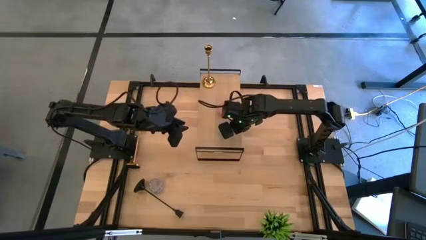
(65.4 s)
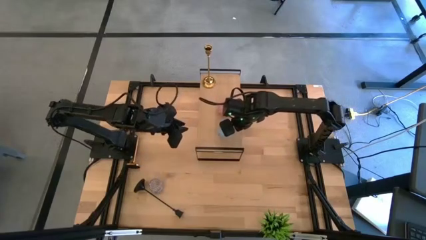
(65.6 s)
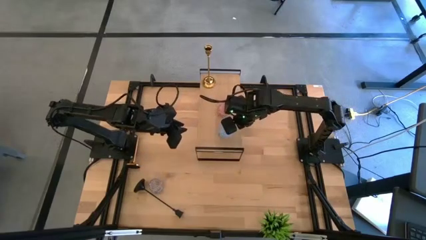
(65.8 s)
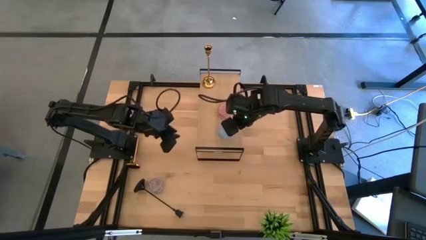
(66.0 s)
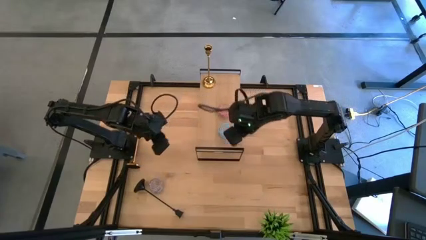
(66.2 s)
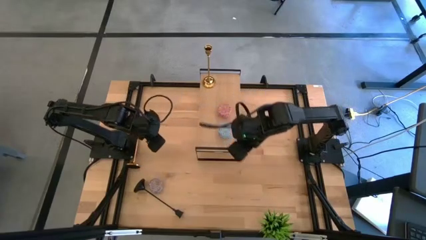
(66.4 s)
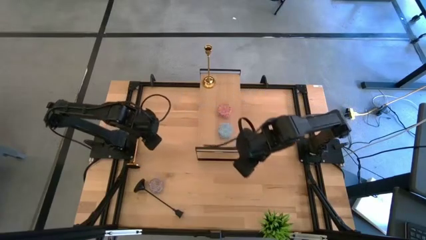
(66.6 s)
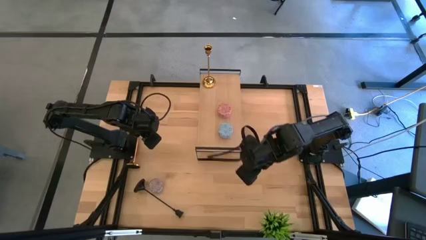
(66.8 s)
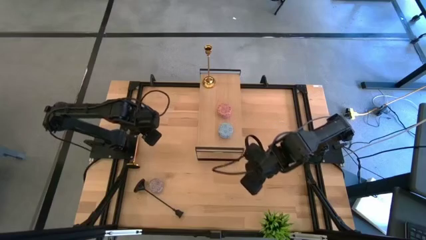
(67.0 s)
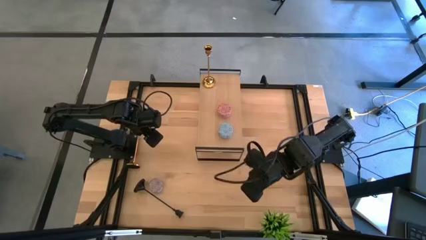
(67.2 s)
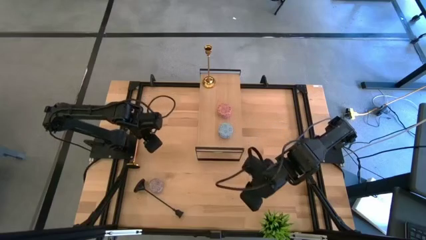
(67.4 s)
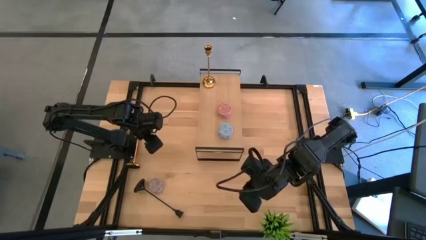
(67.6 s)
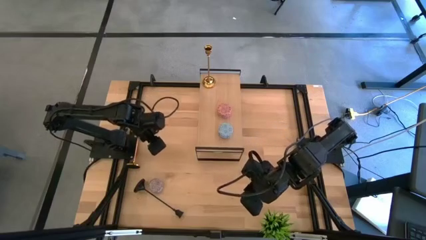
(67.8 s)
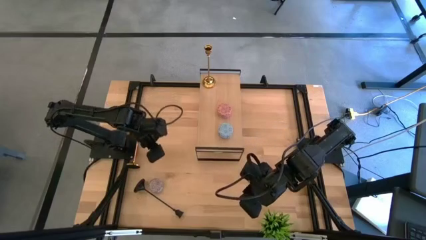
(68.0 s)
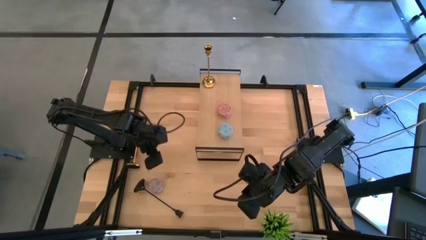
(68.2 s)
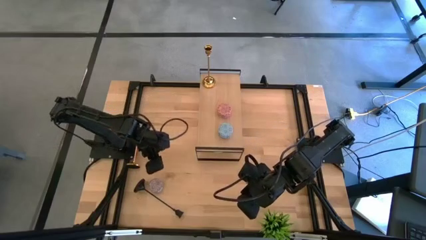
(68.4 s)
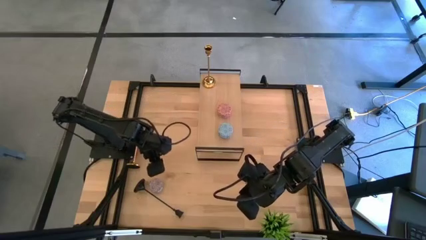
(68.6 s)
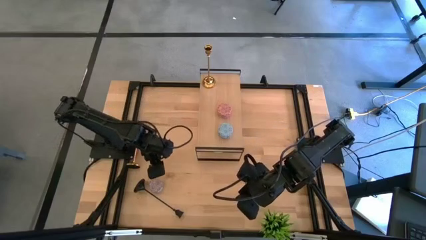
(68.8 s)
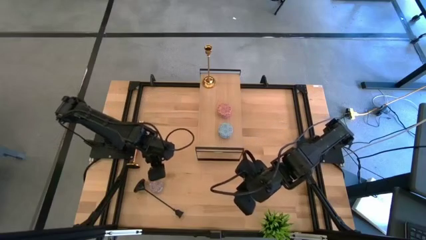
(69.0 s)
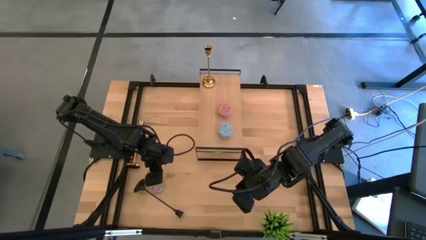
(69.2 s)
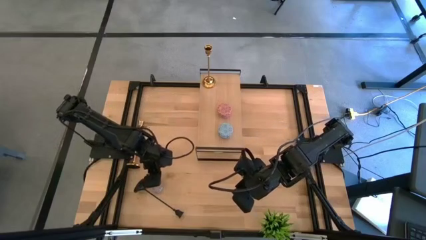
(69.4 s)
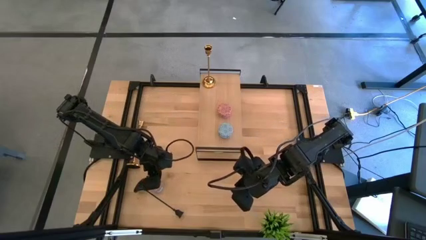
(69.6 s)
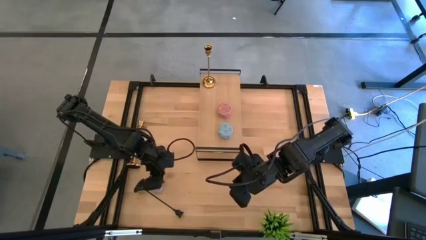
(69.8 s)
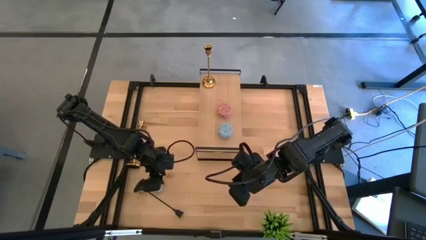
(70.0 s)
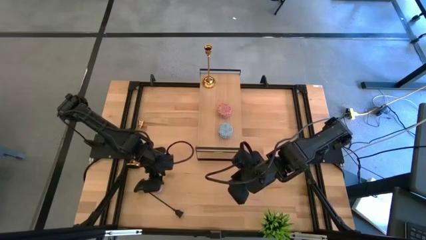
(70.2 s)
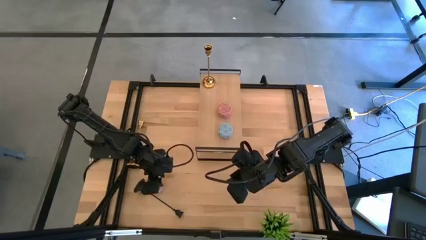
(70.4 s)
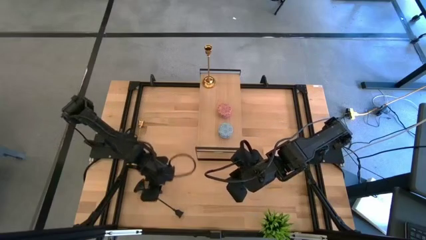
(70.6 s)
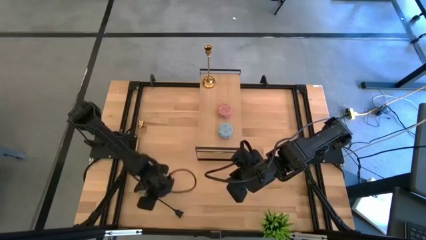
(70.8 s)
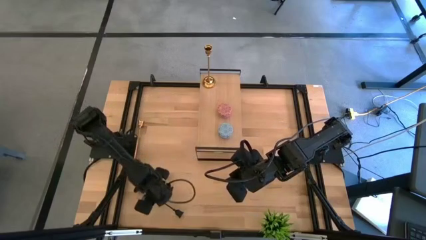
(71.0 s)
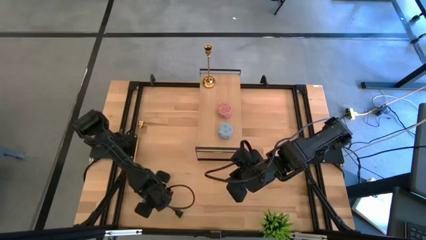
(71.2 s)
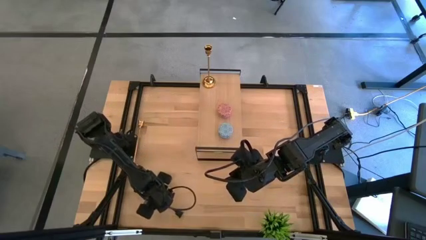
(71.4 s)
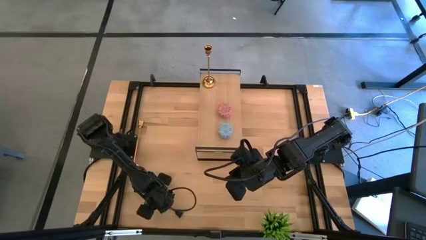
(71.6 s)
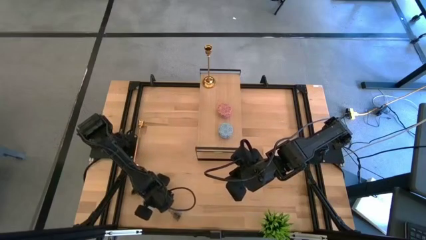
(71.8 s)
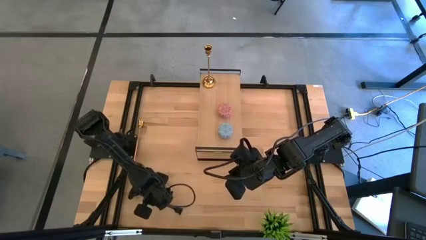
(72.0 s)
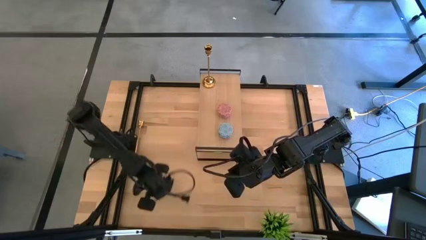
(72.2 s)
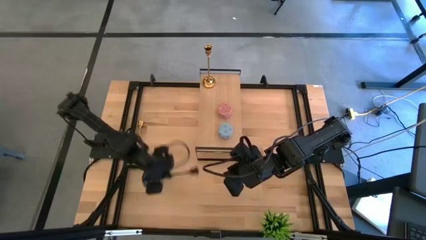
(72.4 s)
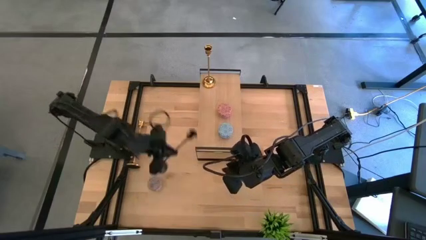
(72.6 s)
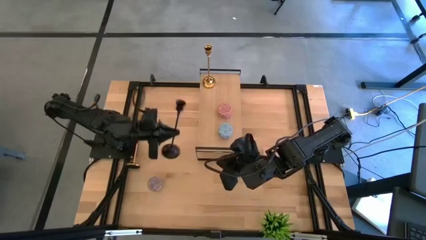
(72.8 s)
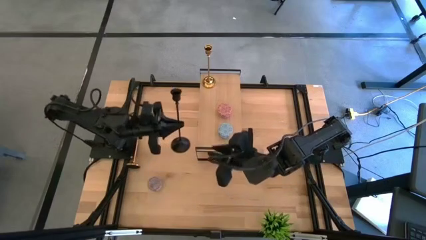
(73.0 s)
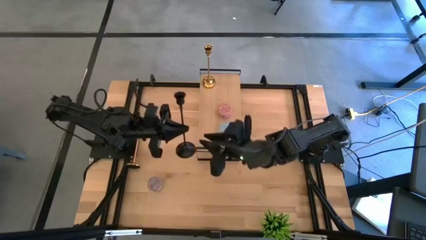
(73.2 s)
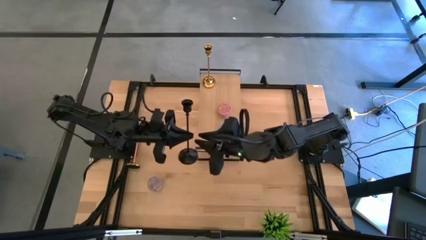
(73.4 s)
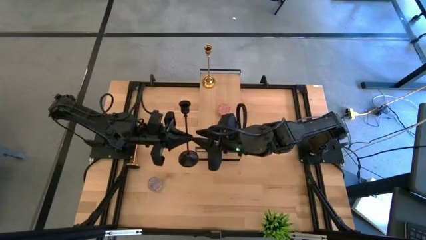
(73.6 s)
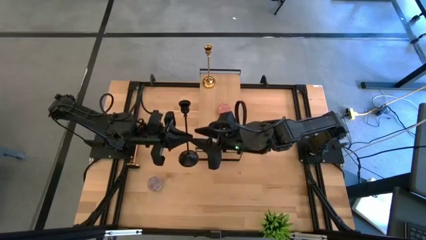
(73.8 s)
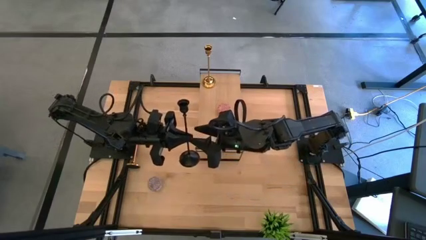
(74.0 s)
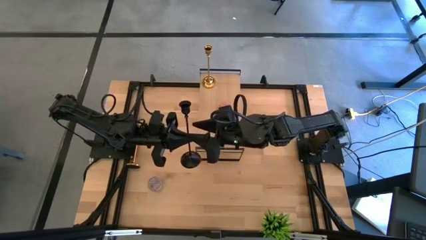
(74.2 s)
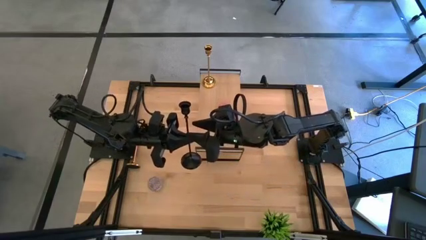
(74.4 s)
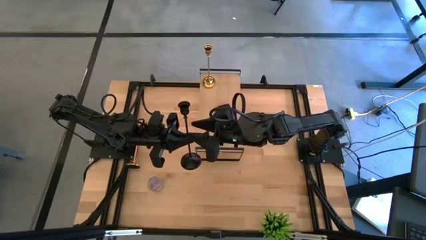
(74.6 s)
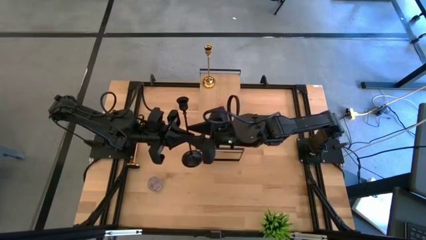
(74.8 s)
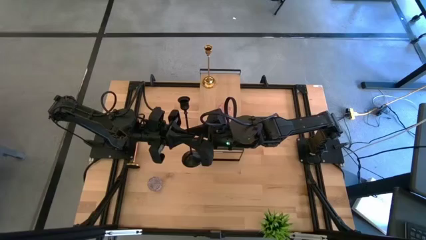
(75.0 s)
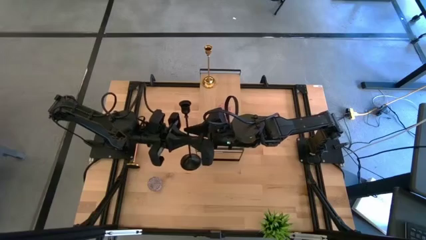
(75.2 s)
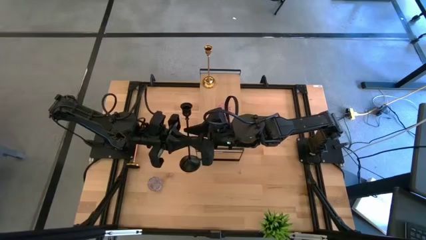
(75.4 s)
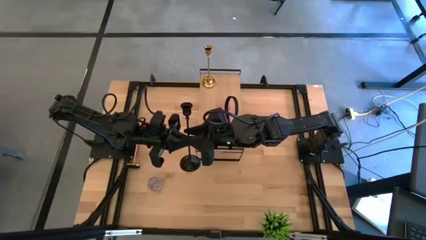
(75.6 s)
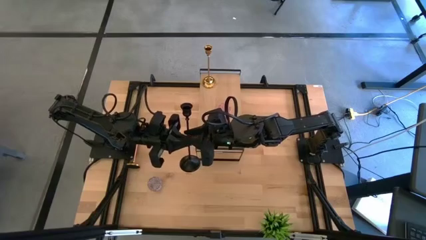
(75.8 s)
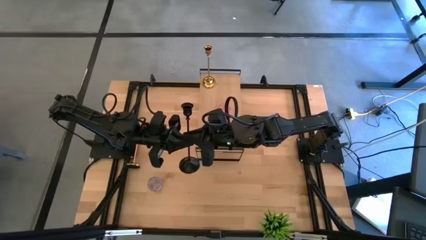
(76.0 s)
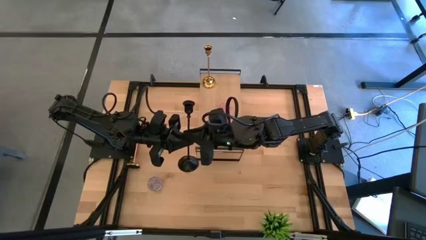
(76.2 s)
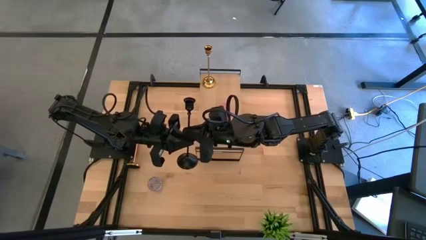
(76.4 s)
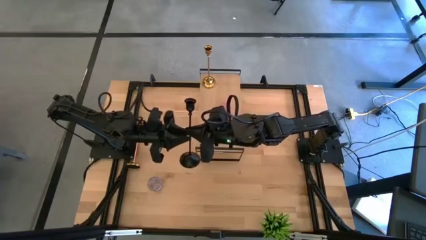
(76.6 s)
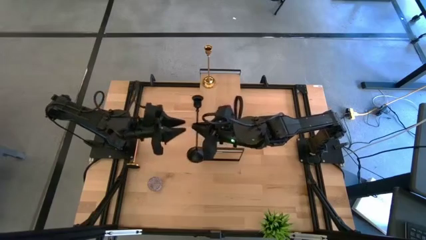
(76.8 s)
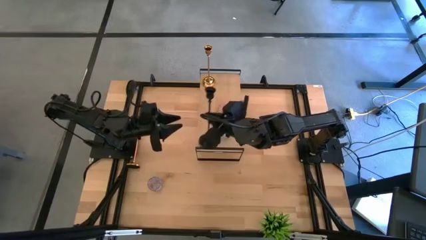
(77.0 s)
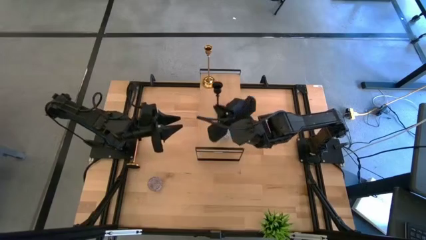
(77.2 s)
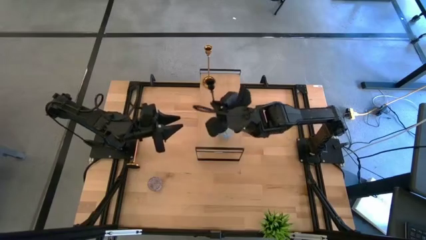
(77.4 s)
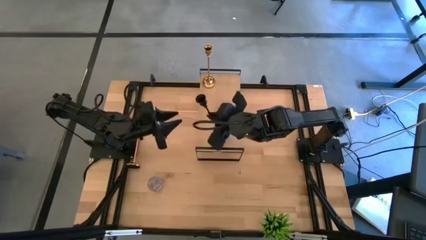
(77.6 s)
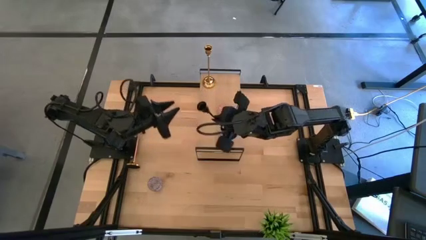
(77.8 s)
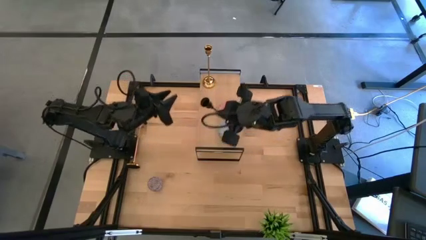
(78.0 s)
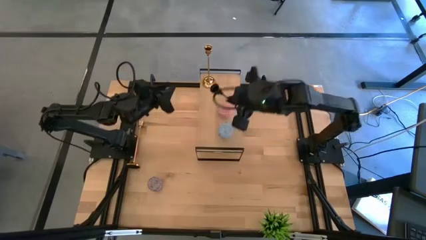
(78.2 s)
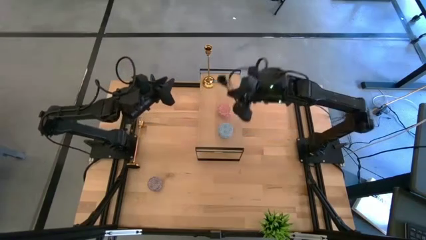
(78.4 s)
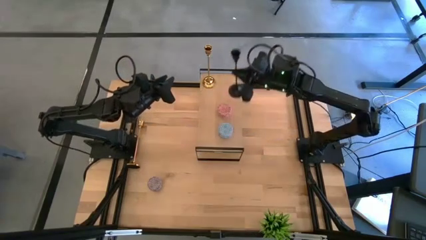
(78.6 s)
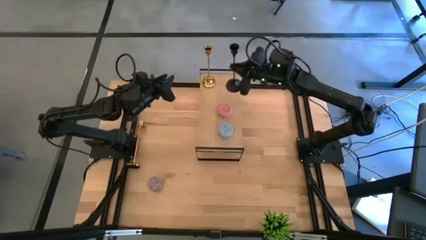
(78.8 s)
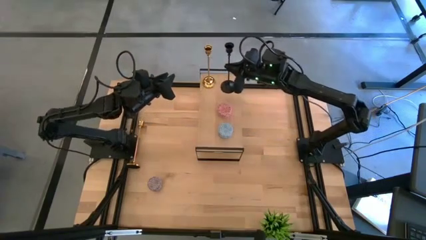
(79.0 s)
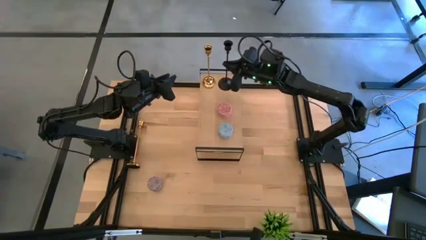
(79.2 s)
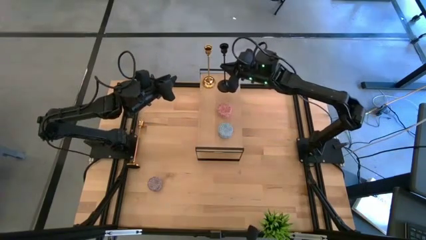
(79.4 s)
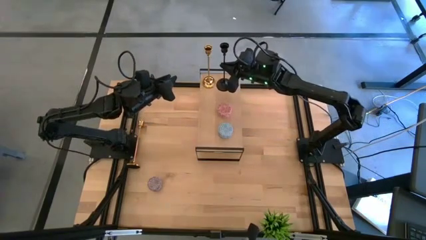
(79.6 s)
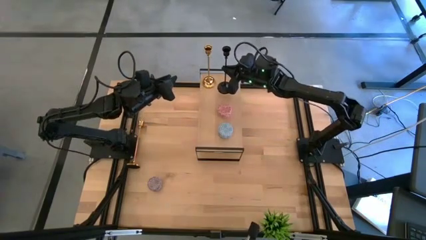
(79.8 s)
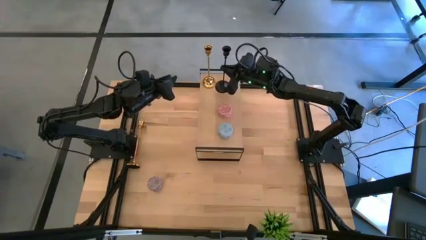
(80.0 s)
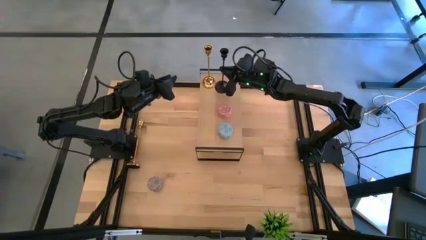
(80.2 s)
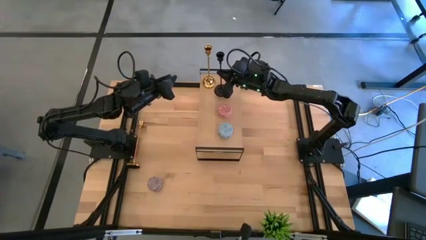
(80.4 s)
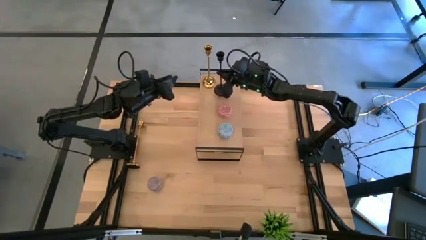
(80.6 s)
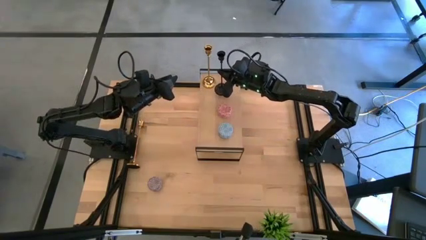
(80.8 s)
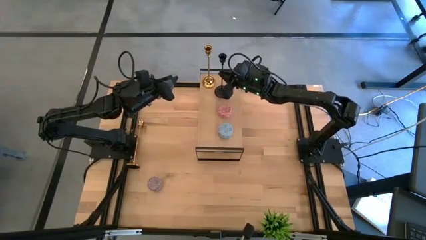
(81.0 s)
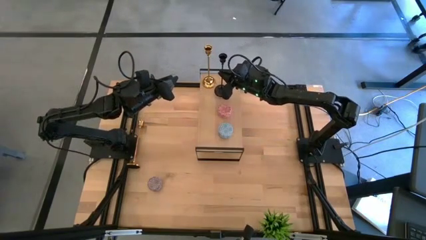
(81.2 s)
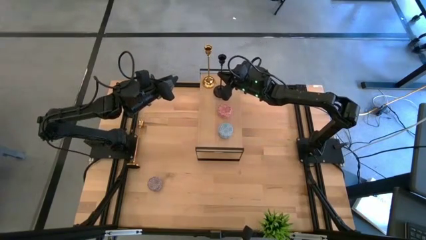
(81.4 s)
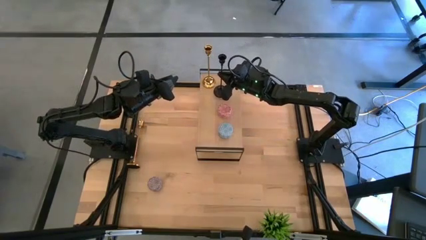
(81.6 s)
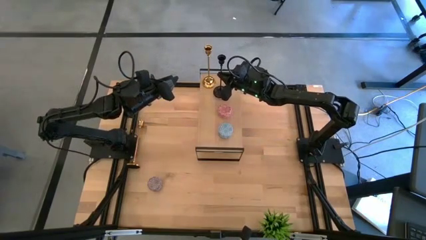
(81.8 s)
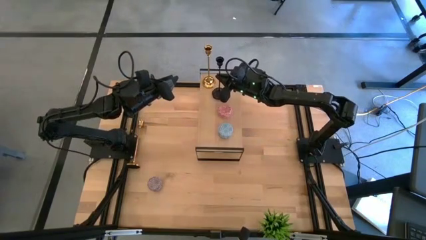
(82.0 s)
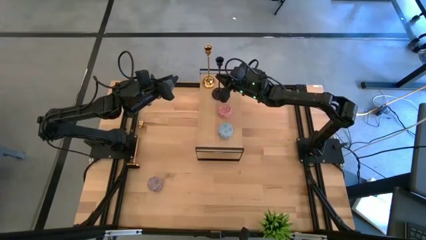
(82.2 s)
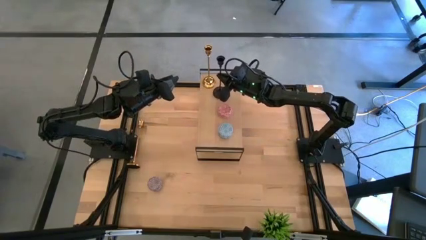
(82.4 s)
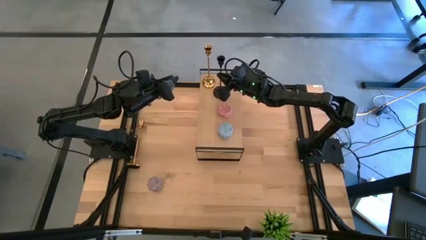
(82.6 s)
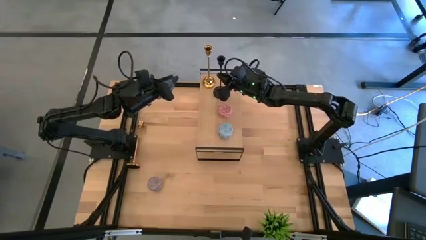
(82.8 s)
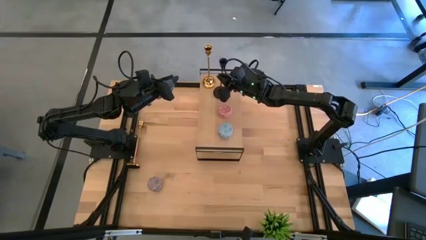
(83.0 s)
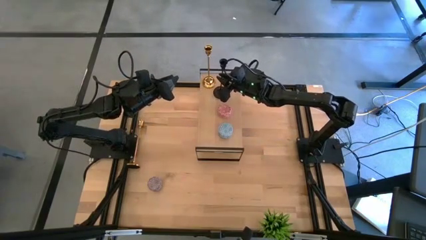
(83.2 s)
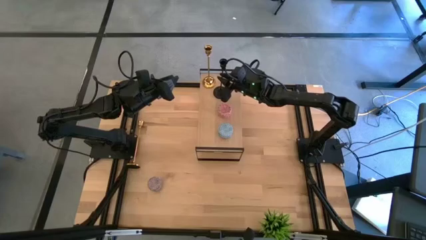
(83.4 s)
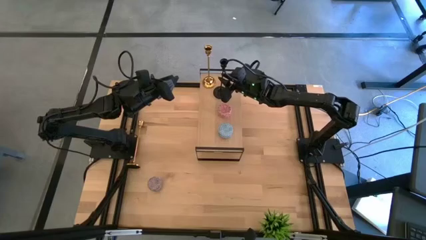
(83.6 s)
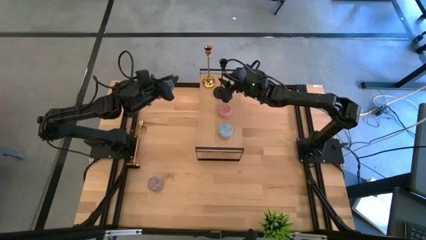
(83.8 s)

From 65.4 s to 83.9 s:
Task: Pick & Place candle stick holders
Put the black candle holder on the shelf
